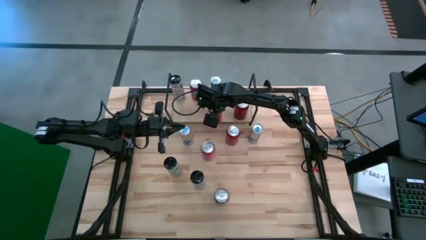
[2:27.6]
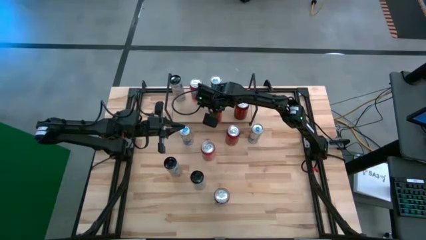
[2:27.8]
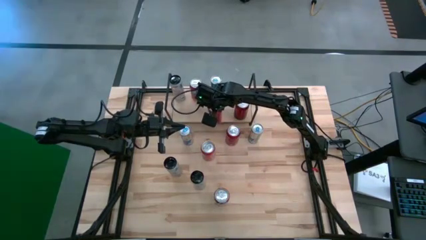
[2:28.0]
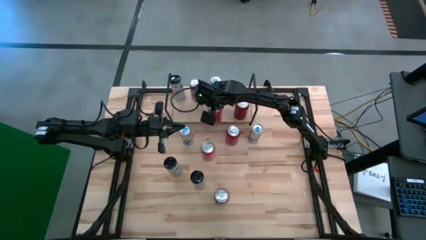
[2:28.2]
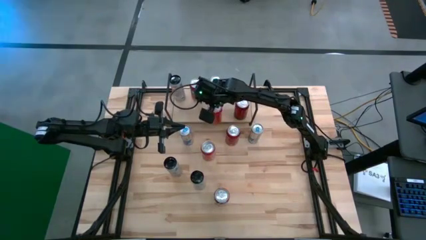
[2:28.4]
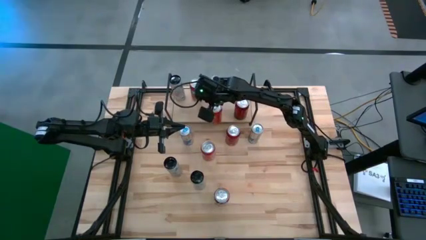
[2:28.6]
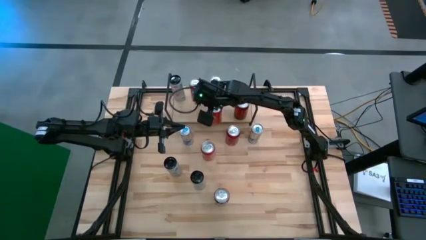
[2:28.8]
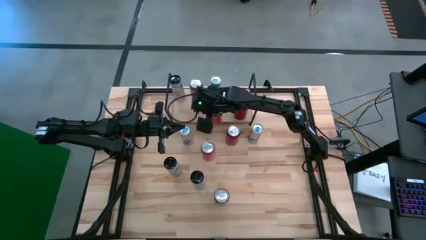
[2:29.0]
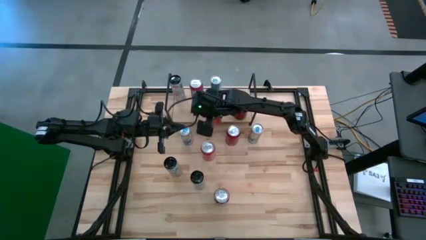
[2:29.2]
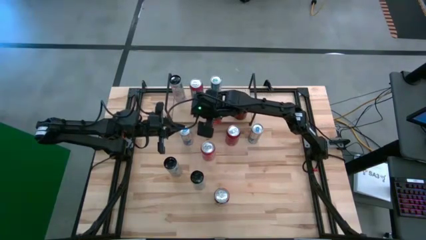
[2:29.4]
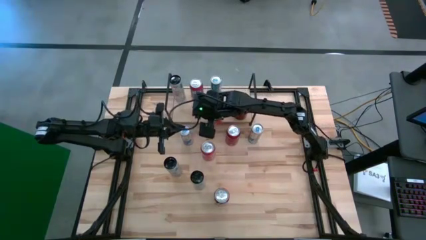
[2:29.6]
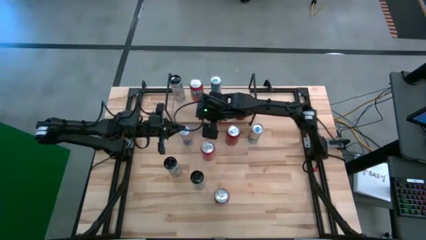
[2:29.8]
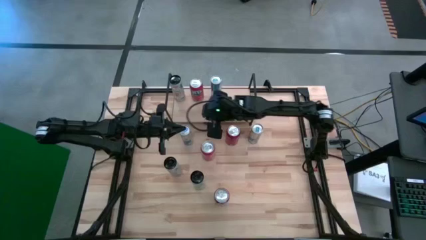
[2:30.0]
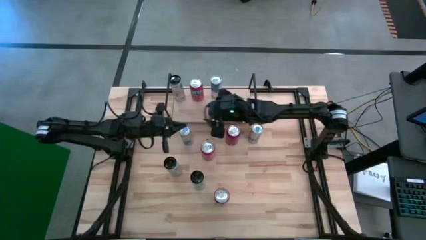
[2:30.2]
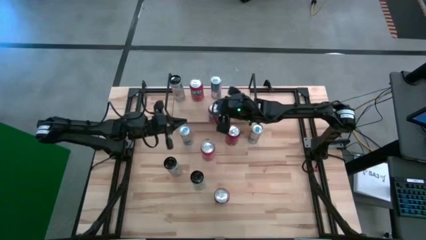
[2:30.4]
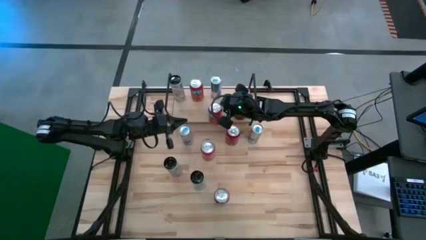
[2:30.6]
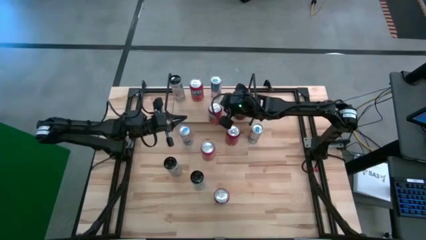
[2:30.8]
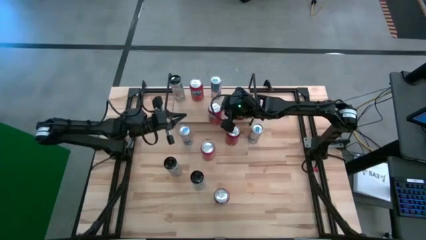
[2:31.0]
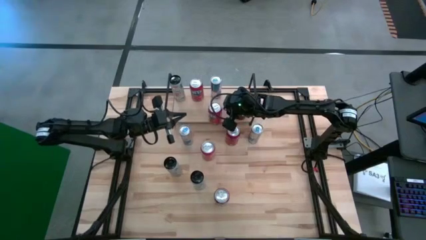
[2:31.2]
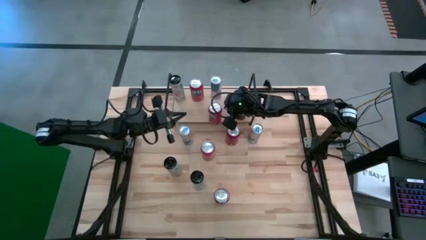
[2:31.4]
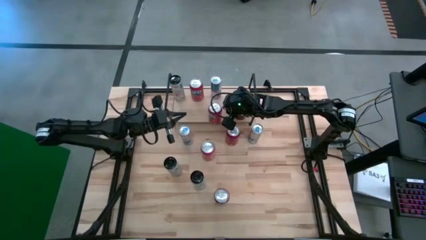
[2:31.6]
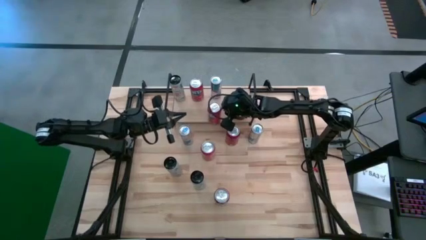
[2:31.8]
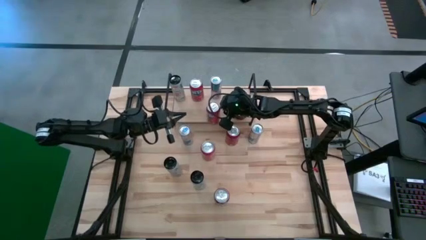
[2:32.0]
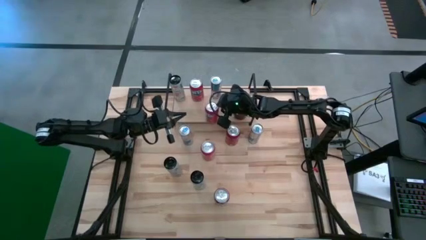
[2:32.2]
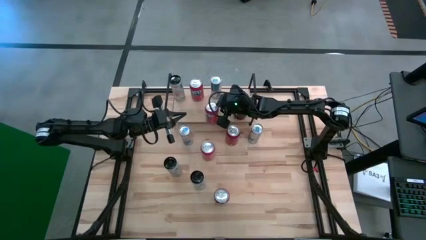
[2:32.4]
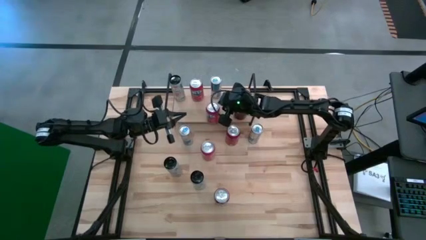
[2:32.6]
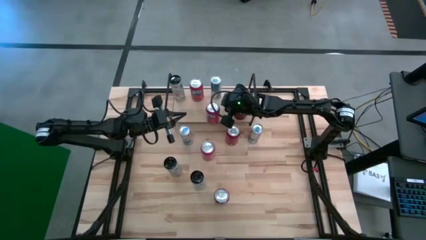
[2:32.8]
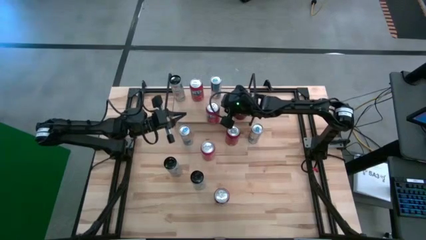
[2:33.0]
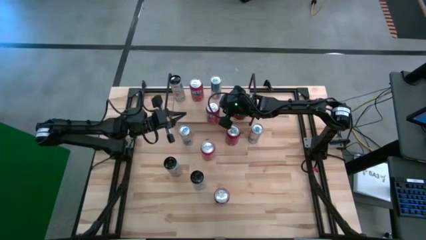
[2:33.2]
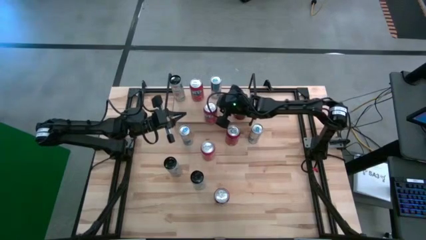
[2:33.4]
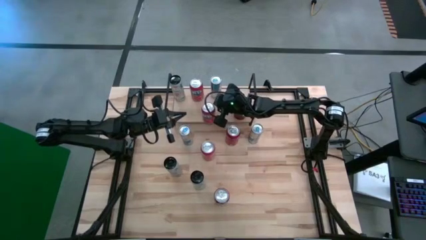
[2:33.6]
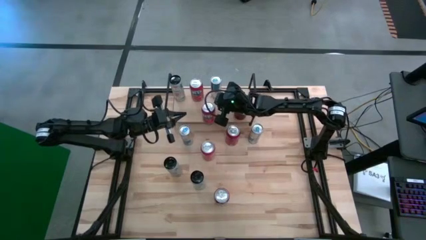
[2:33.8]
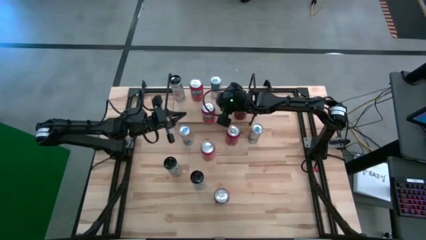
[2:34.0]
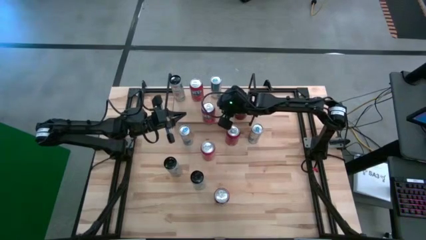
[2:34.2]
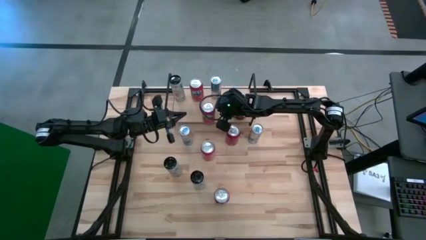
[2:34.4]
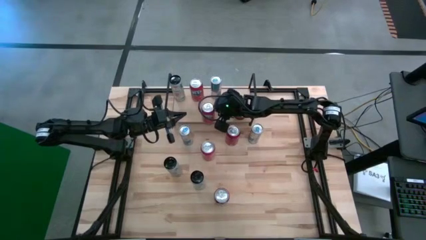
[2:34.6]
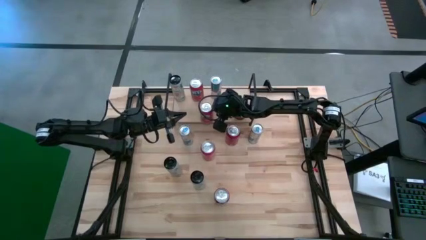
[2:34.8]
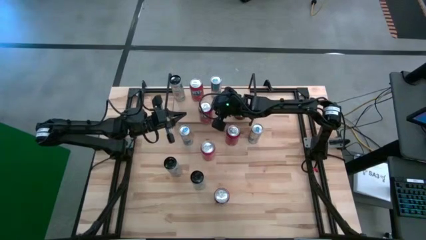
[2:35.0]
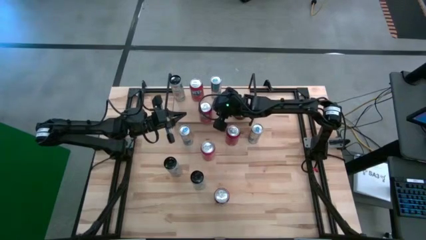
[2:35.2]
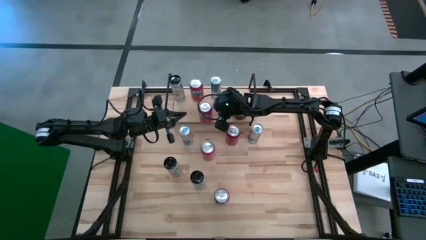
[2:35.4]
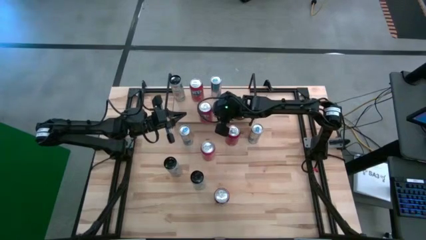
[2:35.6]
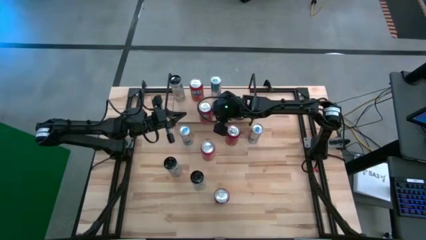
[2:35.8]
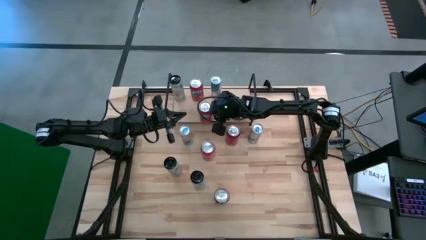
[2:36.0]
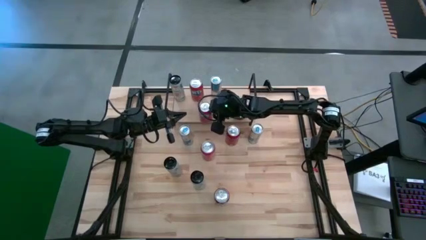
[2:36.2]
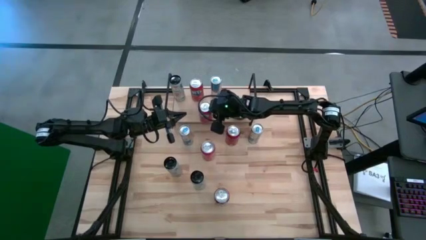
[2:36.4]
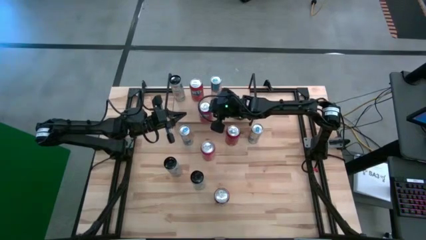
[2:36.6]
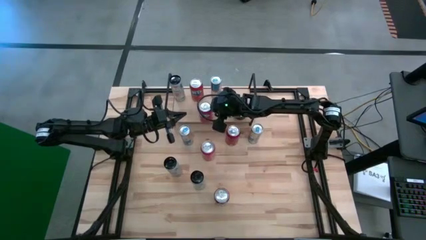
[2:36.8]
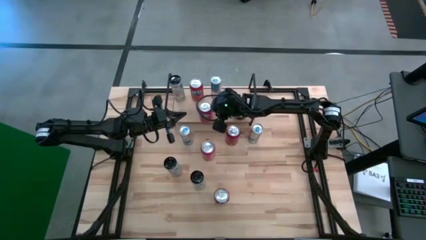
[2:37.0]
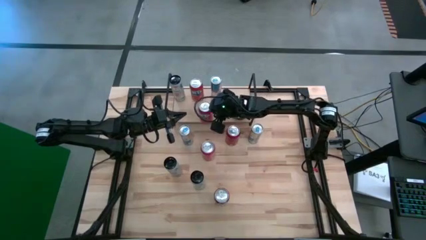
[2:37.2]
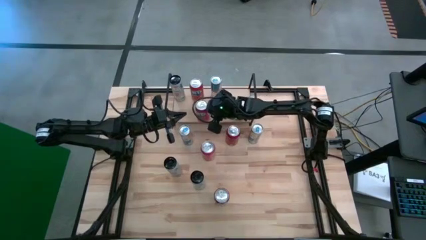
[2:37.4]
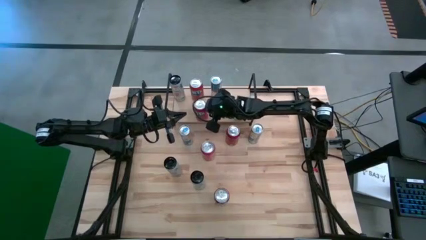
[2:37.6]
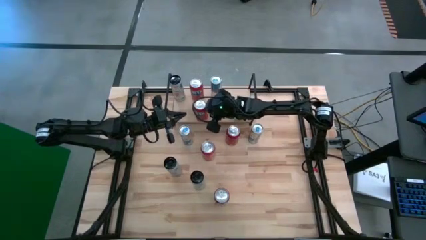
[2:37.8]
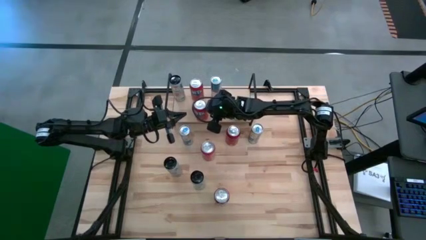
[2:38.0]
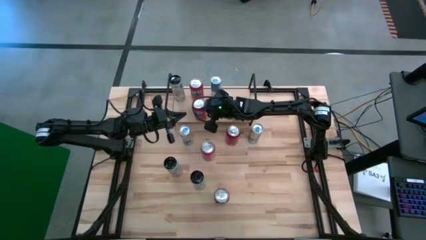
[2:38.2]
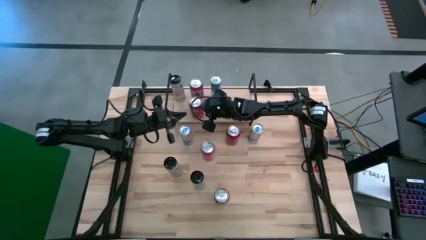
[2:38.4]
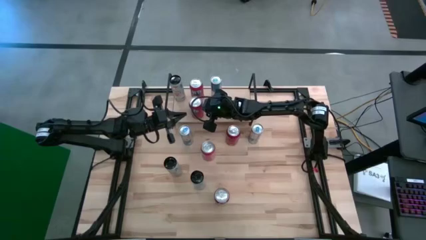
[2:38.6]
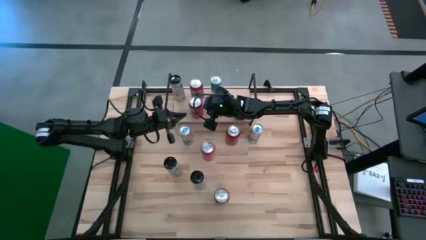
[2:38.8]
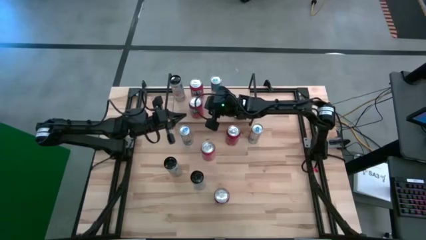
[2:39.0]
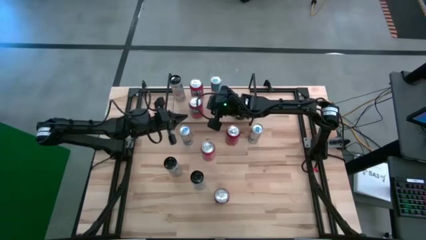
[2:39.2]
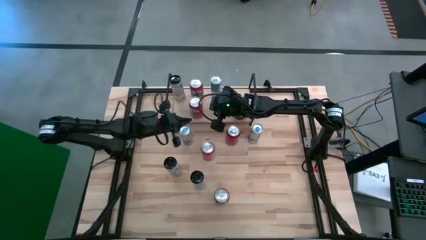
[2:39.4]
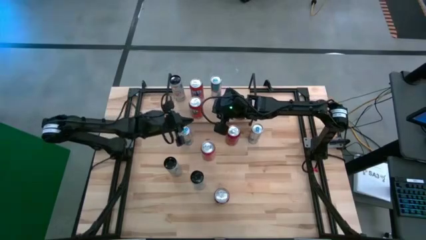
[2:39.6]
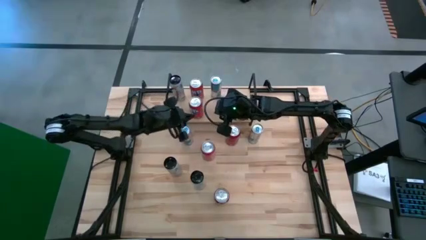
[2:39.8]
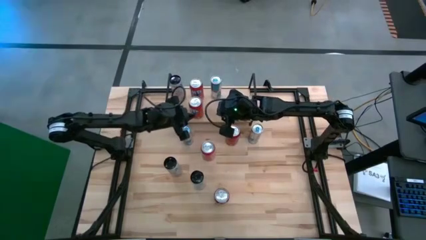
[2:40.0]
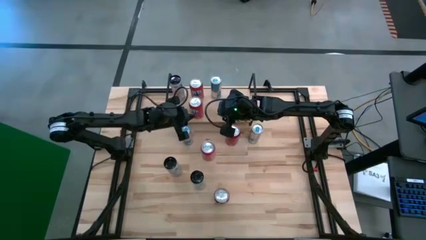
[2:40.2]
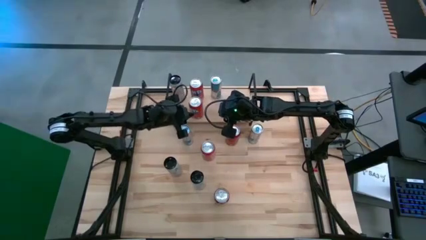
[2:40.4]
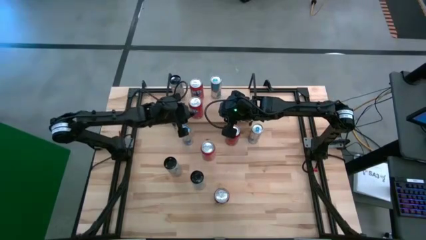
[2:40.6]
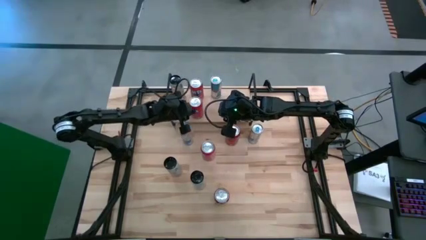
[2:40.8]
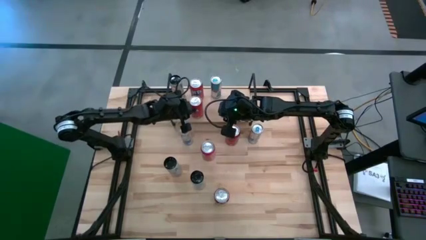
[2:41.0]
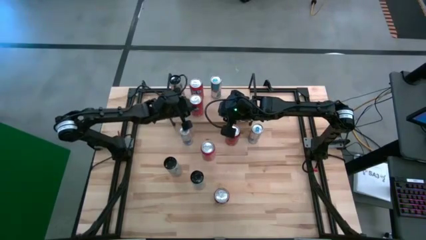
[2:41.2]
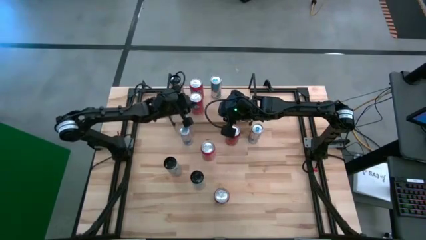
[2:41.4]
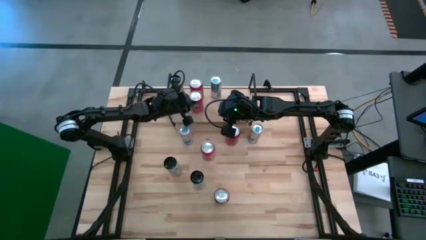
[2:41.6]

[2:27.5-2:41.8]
Task: Place canned beverage on shelf
Put the bottom orange soda can on the shelf aligned with the other orange soda can
